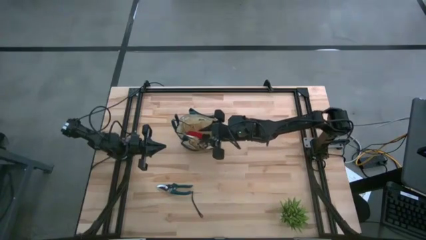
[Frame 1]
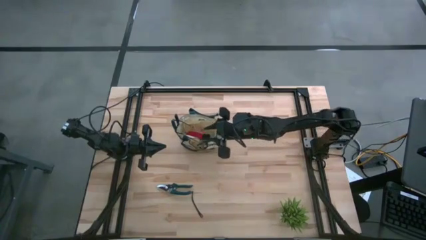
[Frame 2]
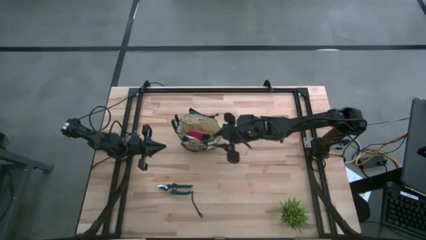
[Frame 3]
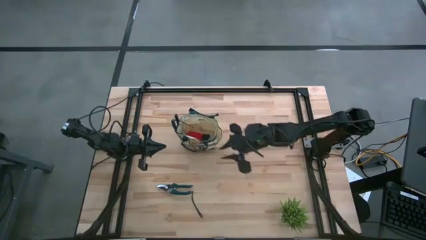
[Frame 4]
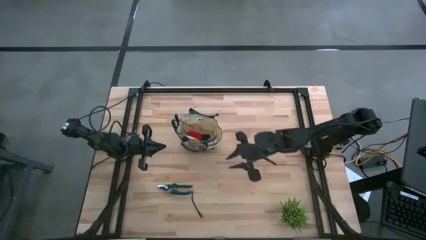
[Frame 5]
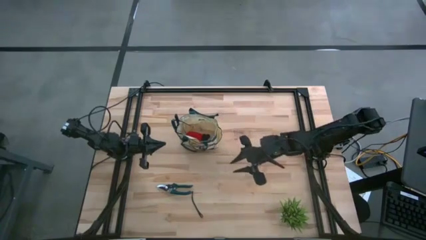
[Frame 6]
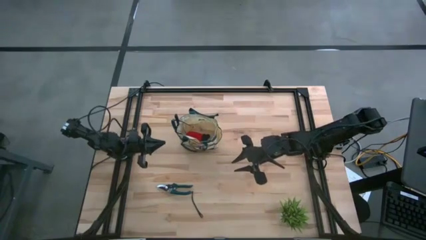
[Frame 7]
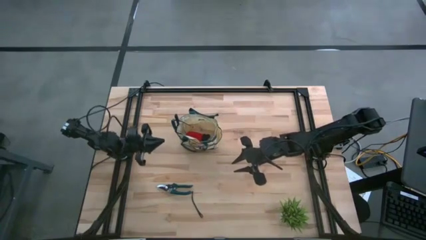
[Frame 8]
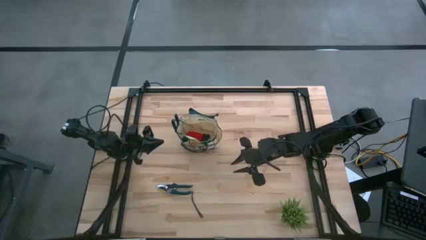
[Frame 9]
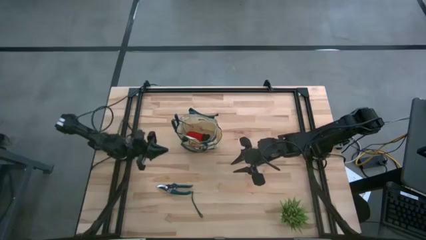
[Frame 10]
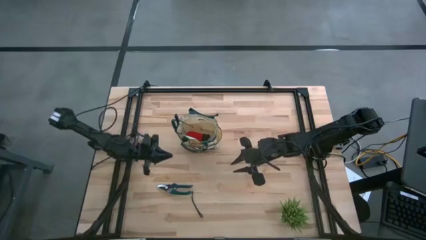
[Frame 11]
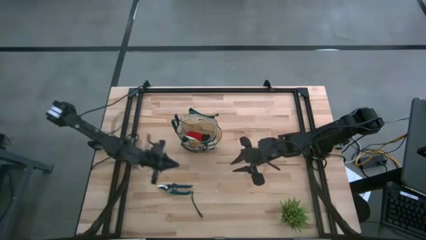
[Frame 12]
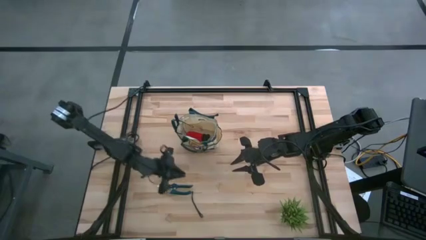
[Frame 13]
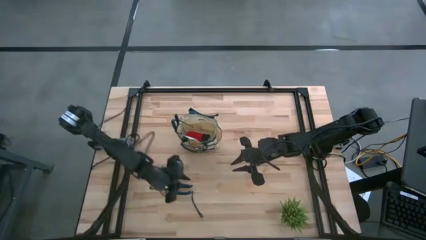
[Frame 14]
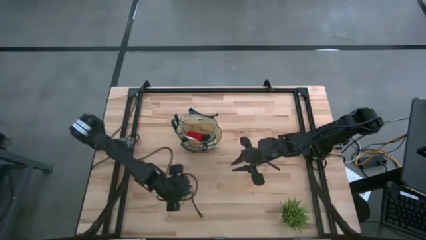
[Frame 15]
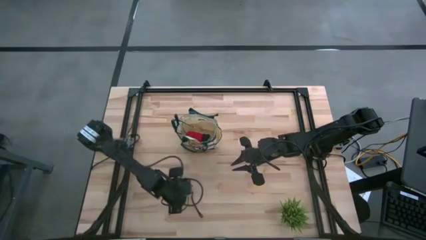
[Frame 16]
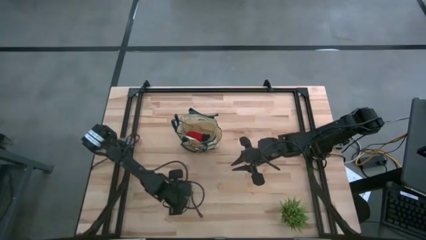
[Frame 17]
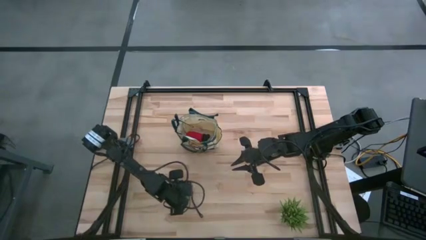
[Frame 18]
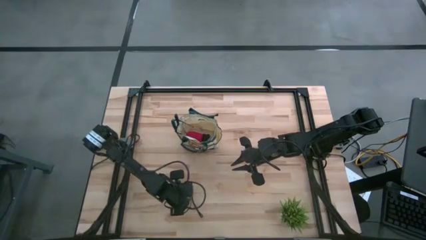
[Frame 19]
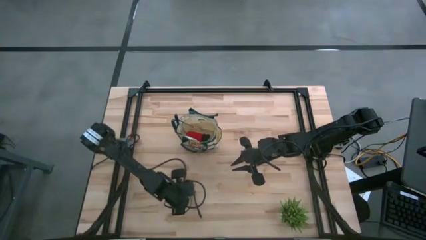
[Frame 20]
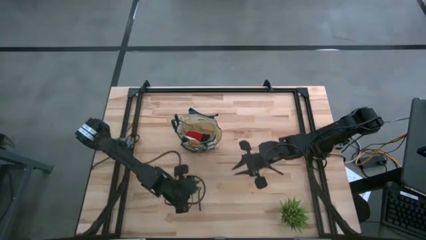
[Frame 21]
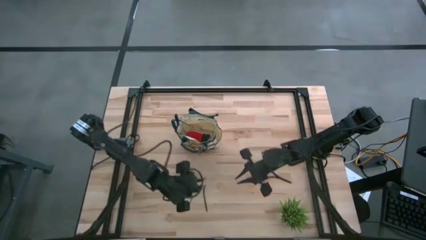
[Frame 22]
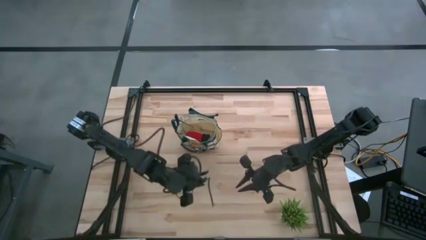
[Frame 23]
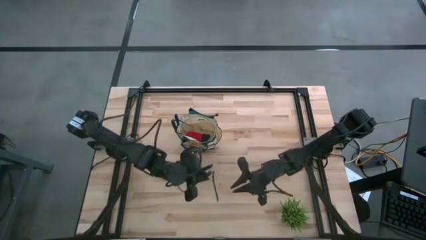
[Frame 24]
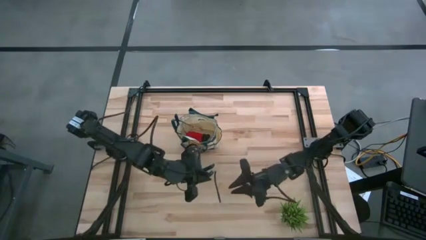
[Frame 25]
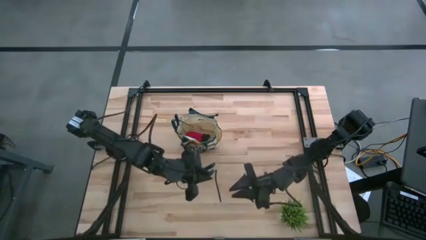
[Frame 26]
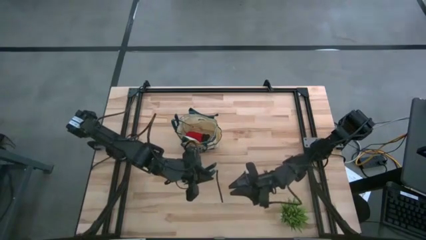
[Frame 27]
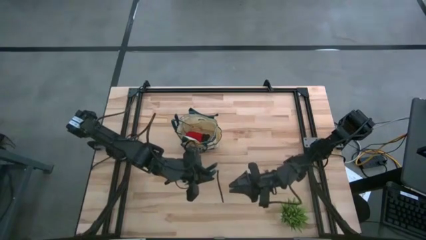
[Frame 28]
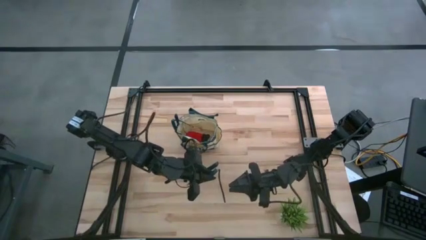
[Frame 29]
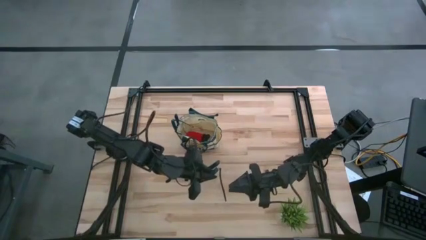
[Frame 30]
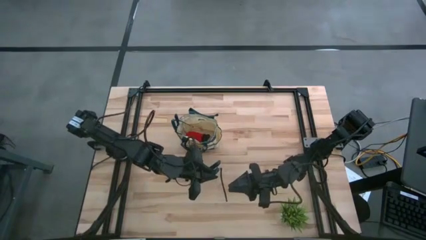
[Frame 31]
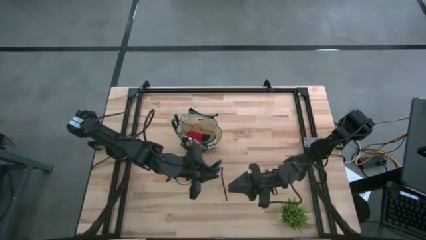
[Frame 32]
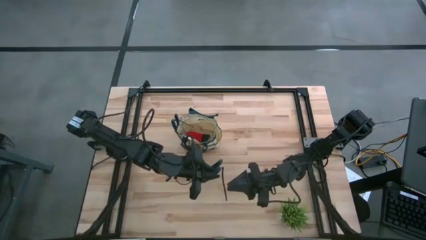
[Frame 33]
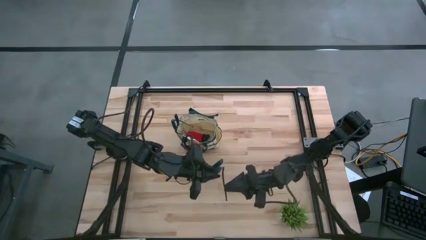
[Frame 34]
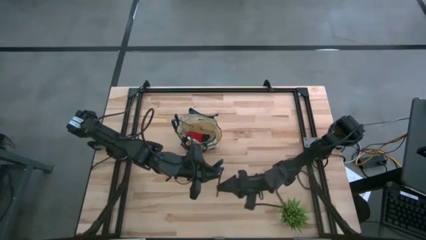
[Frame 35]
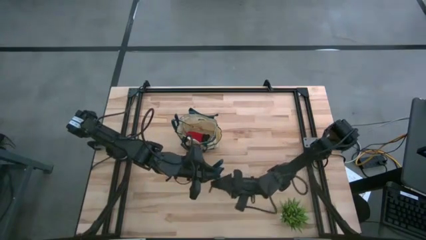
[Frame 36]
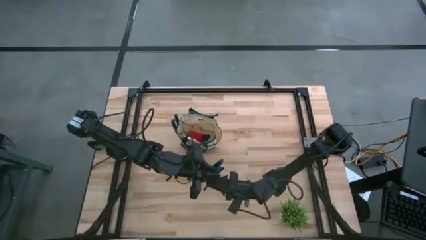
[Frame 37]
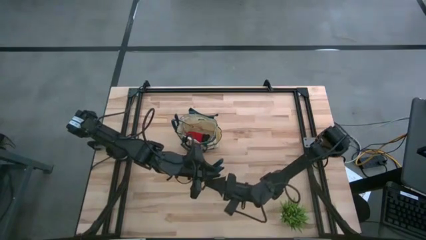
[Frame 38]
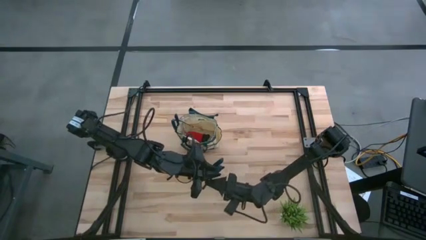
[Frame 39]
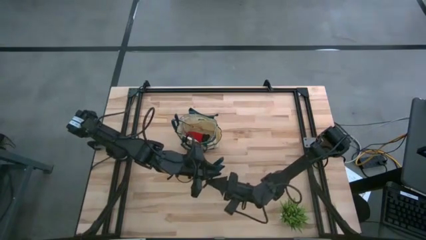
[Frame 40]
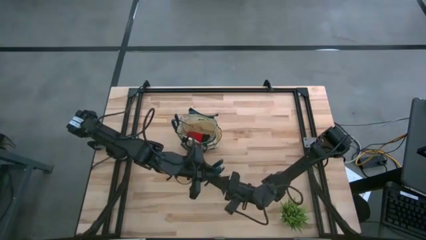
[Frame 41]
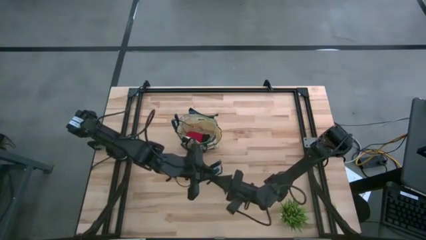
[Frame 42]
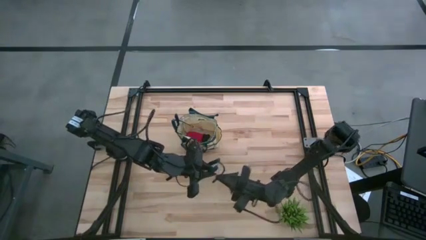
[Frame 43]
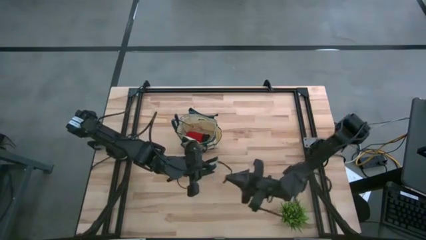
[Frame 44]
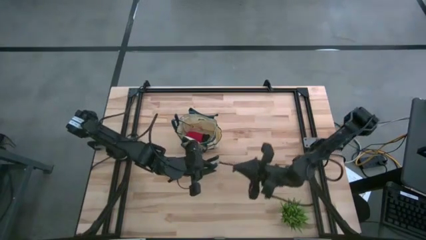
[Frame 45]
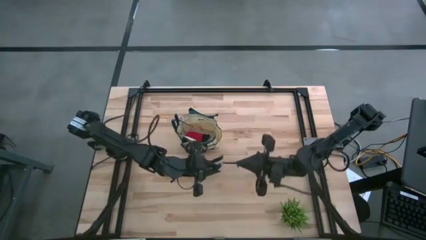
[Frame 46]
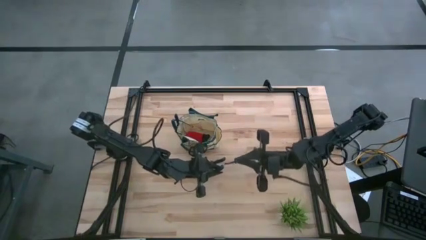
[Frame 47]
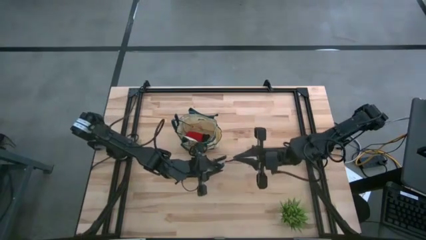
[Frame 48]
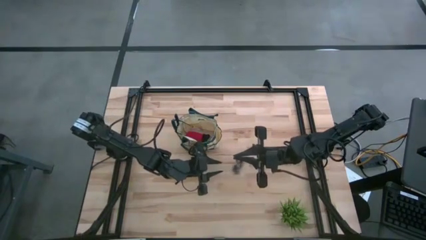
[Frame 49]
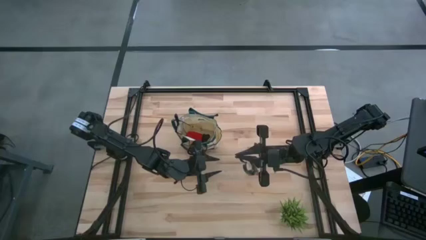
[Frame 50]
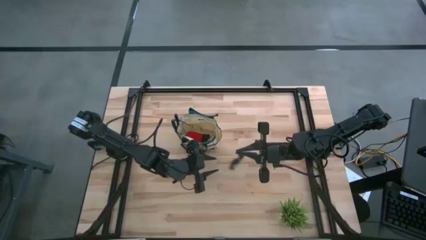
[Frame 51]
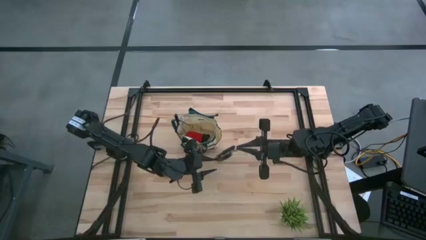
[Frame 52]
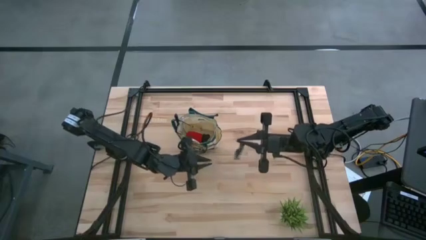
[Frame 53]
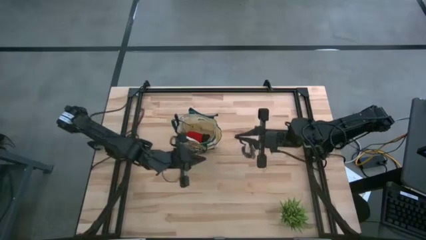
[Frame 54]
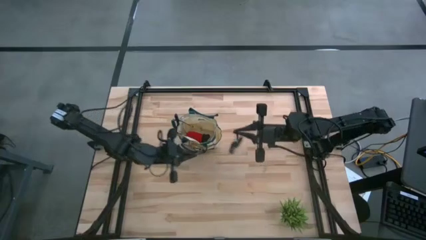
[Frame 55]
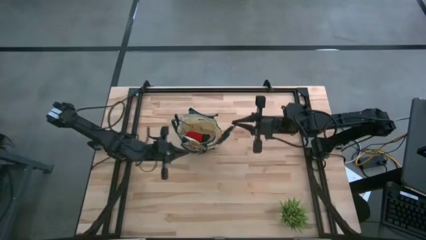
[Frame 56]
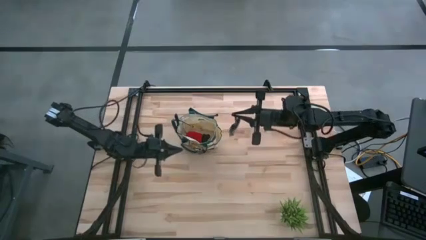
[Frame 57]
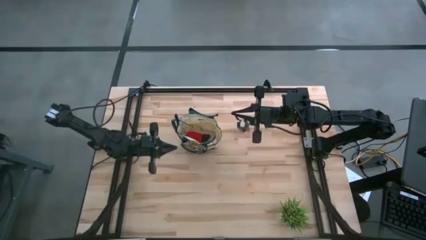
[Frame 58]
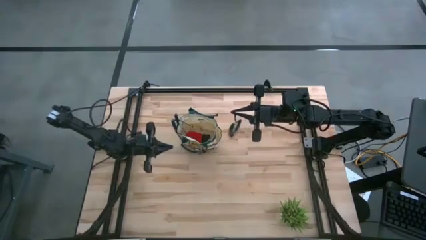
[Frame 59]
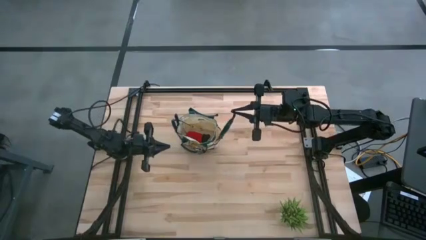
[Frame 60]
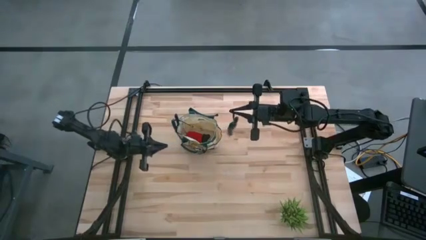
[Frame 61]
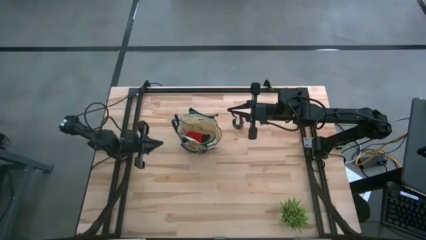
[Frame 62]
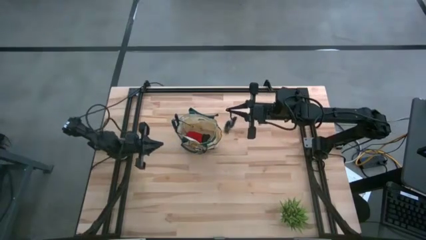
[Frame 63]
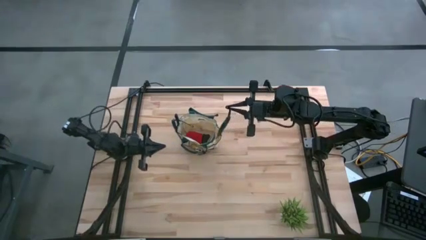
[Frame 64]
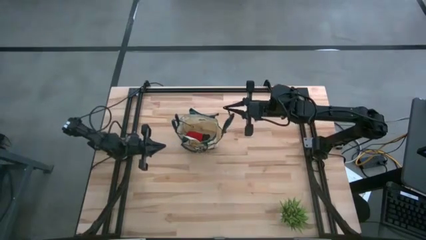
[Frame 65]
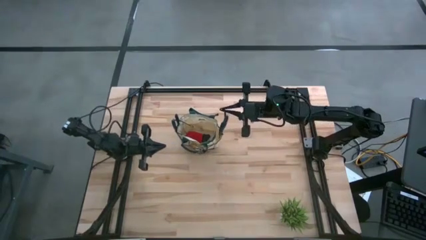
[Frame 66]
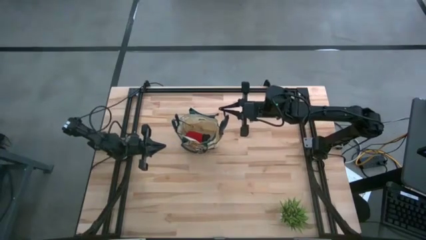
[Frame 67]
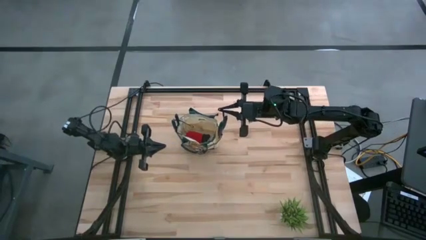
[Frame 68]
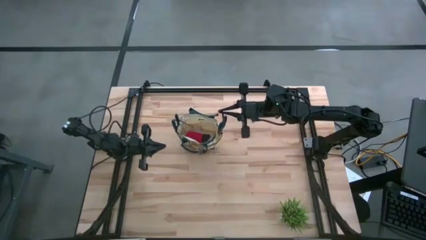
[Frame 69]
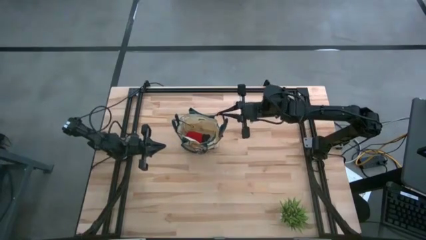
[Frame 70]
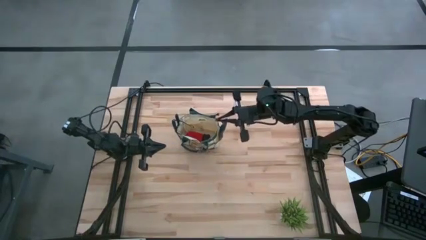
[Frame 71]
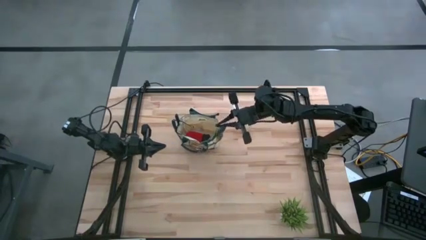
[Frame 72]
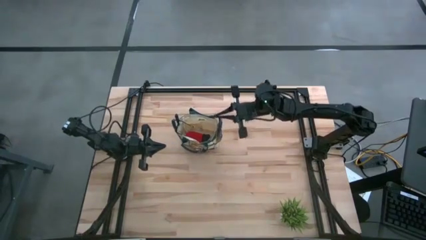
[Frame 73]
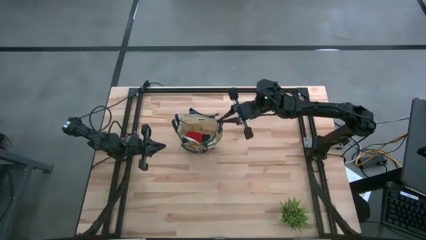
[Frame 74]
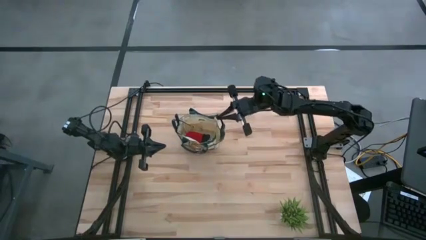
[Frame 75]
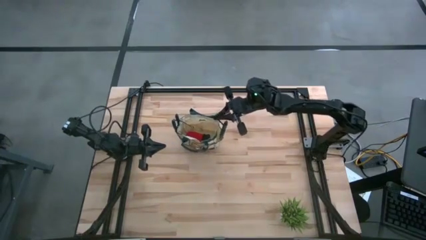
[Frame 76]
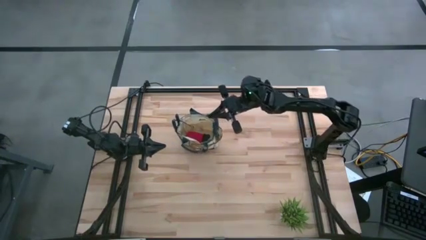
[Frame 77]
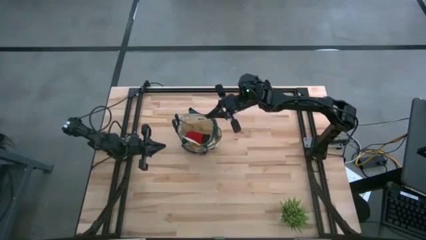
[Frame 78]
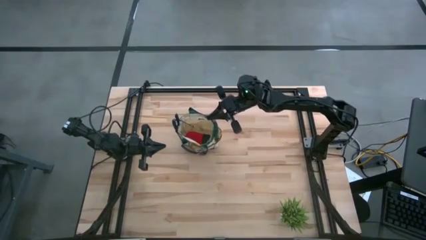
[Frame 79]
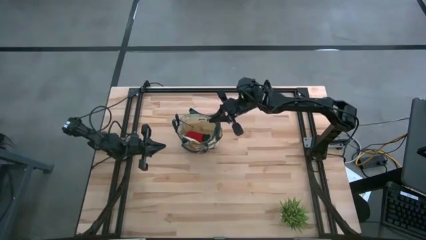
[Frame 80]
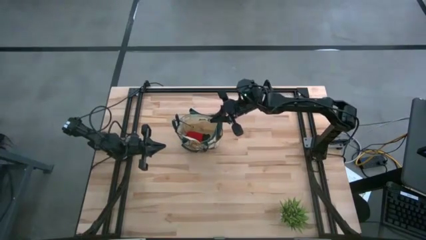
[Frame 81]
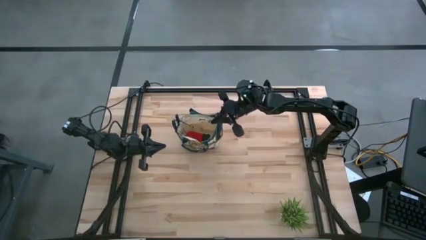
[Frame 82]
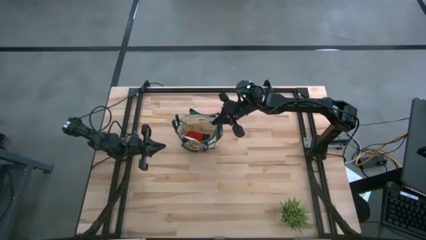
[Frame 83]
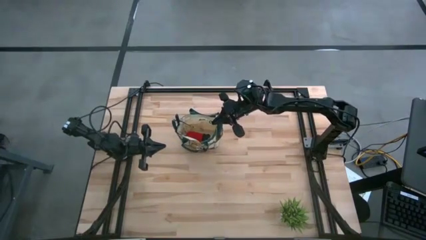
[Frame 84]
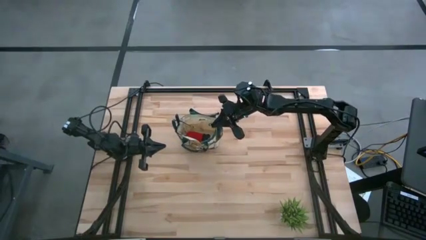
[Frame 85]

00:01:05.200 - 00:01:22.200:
Task: Pick & Place Garden tools in Gardening bag
Put the shear scissors into the gardening bag
